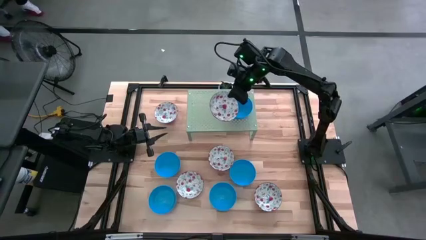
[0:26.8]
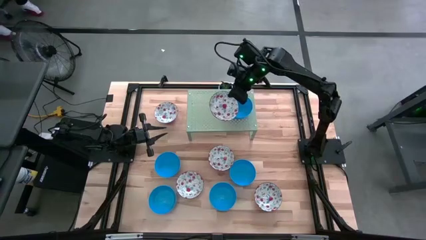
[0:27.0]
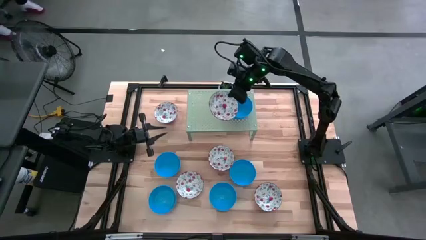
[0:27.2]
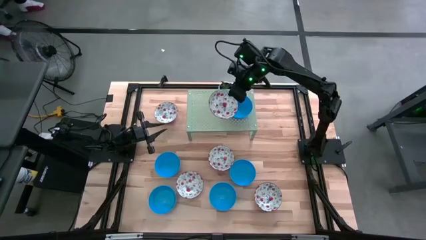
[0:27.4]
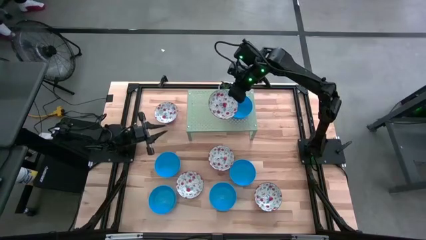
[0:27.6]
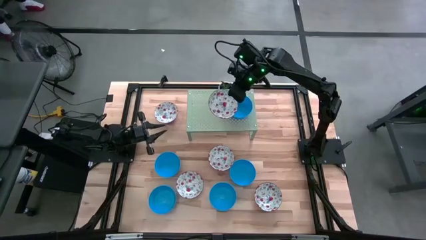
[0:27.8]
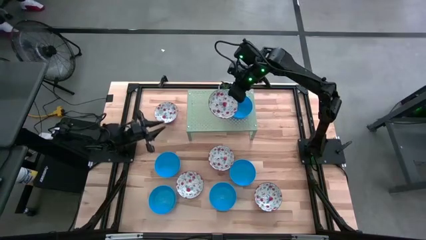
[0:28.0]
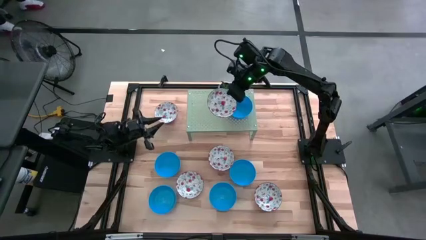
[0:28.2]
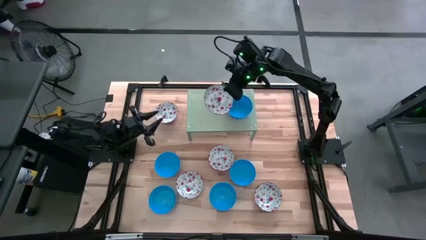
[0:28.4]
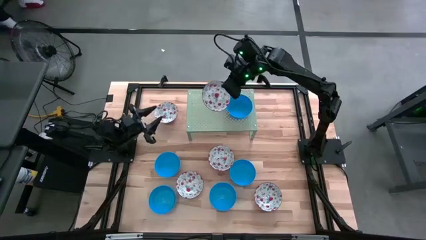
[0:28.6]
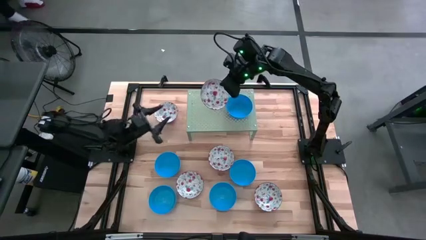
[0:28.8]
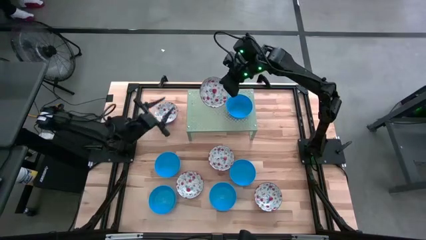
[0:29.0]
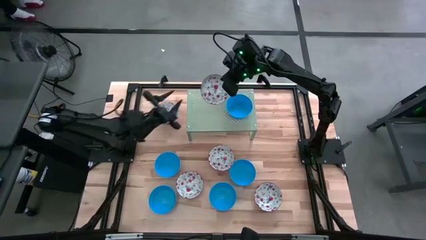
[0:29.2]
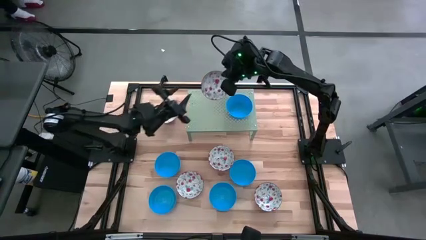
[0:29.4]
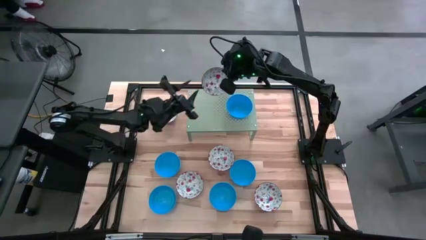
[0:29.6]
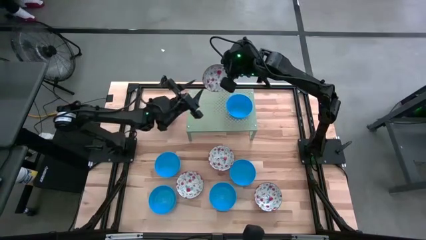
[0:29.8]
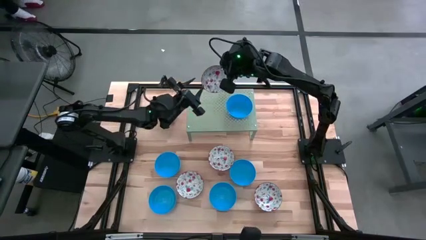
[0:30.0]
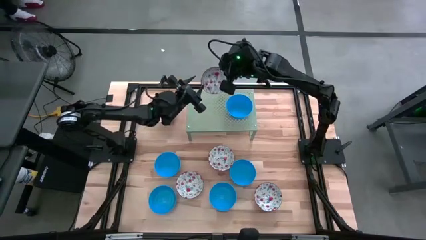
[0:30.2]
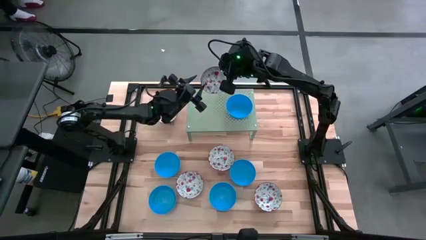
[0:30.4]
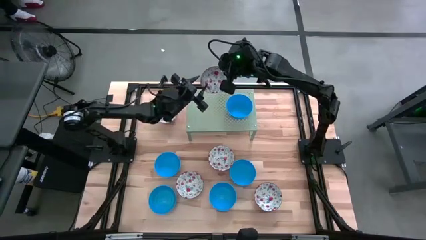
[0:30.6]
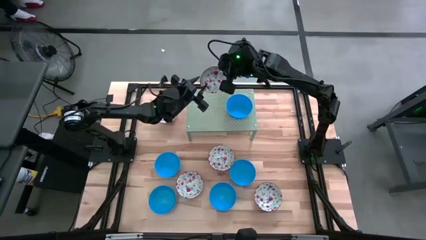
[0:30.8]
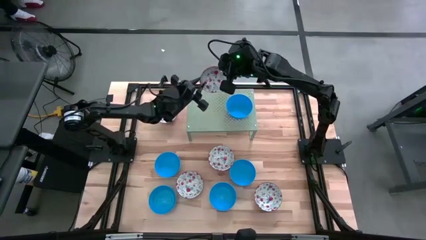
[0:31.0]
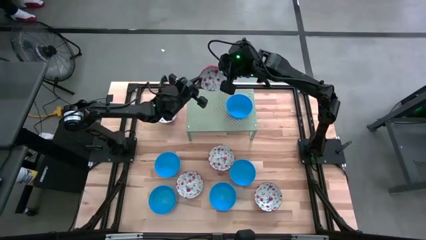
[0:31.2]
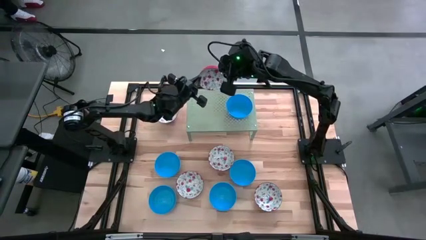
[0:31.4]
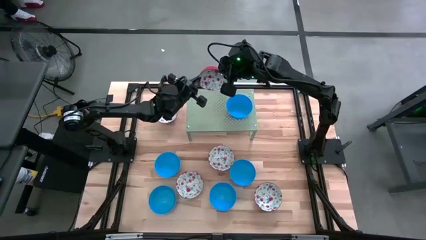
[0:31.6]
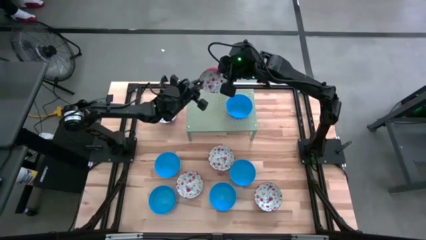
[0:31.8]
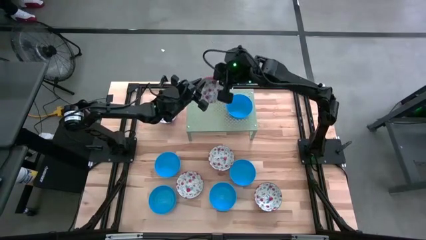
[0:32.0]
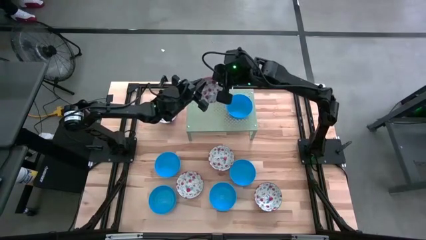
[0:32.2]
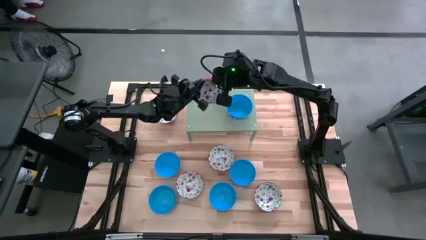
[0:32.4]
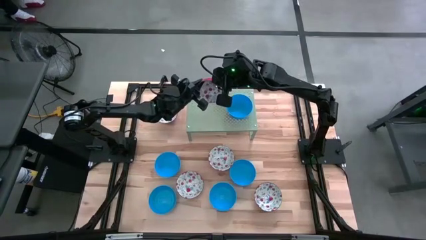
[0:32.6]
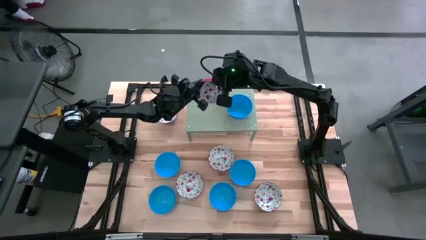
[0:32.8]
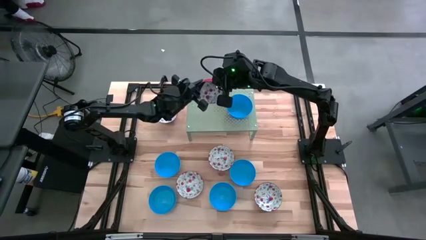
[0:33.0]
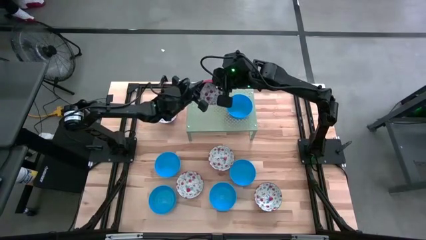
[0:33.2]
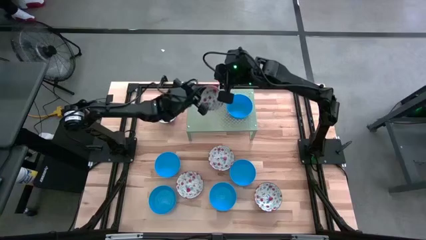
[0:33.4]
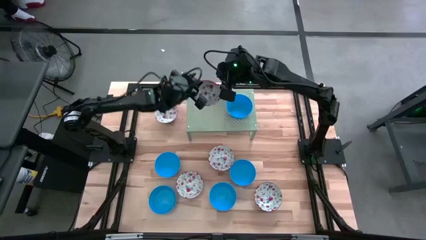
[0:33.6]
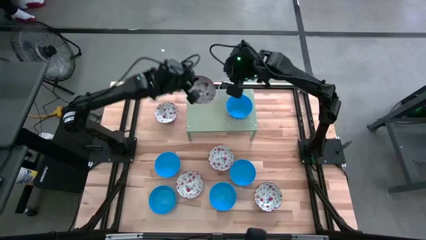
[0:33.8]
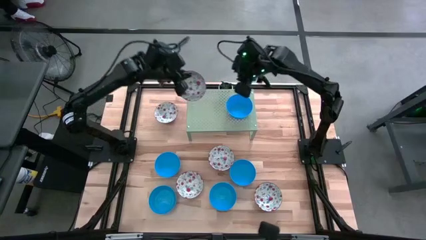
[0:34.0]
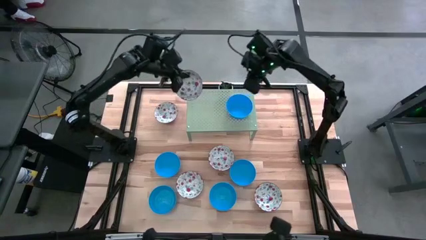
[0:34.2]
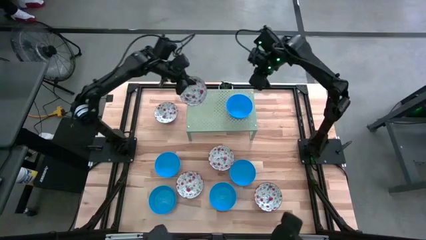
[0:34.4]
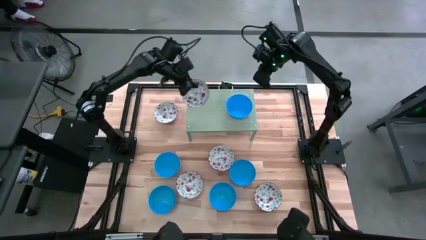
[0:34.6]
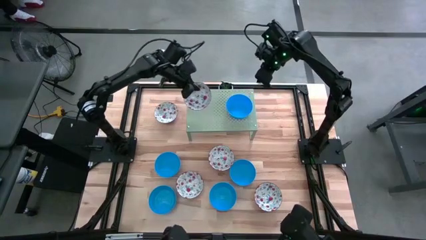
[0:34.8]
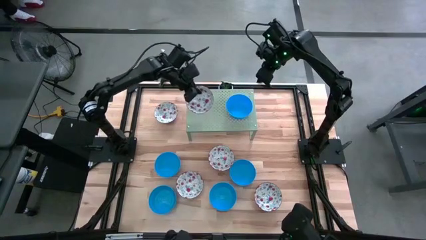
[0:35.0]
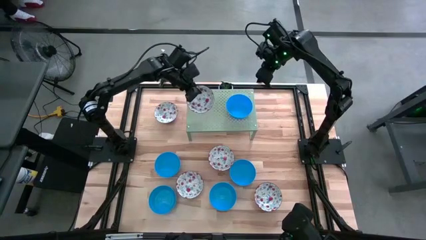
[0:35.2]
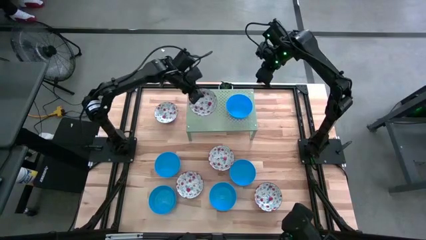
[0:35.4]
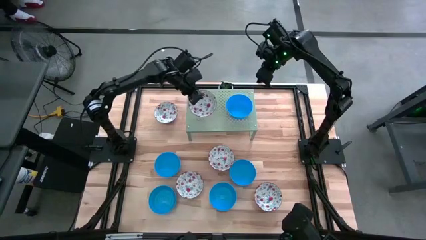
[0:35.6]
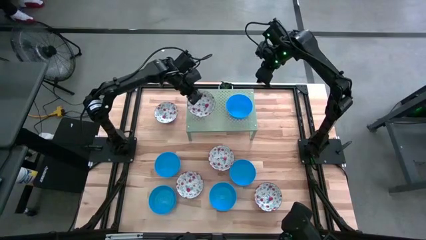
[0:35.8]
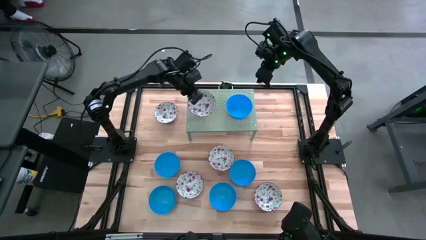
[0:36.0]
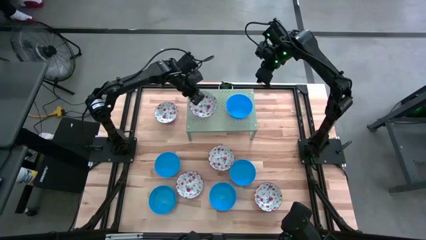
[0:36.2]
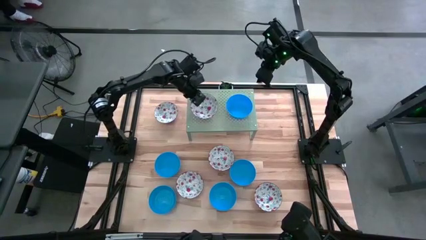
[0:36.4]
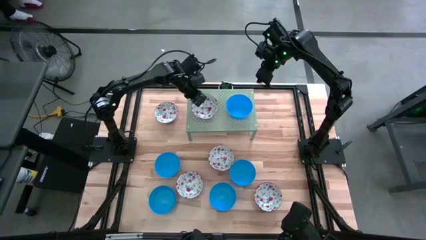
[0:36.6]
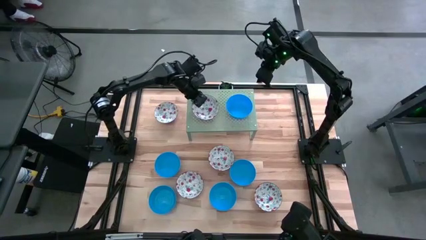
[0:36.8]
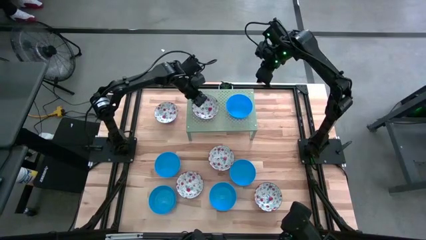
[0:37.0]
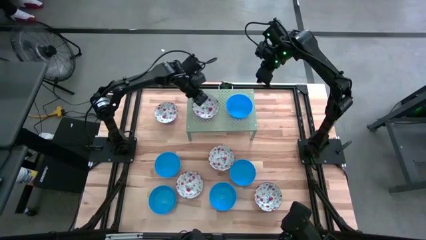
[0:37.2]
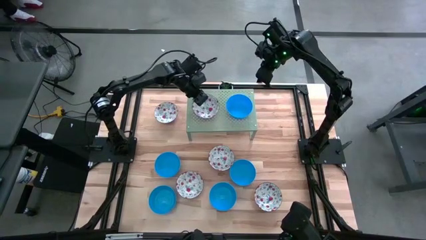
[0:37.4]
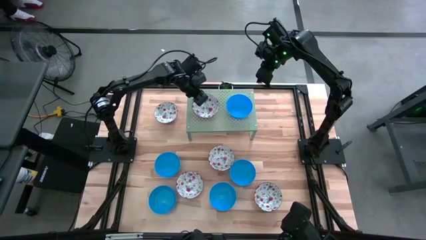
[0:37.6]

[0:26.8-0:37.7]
Task: Pick & Place Mini bowls
Put the patterned red bowl on the shelf

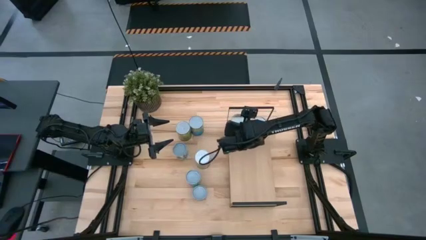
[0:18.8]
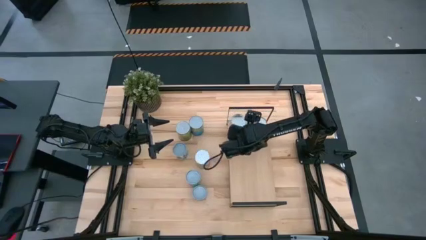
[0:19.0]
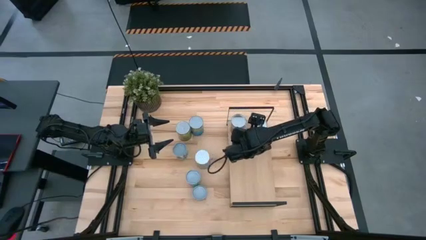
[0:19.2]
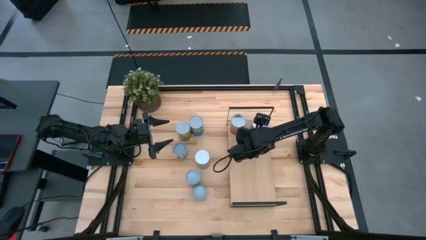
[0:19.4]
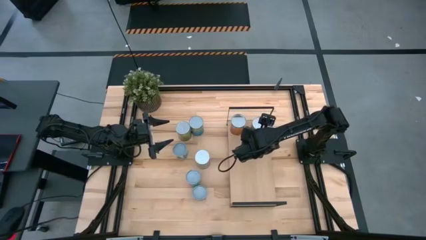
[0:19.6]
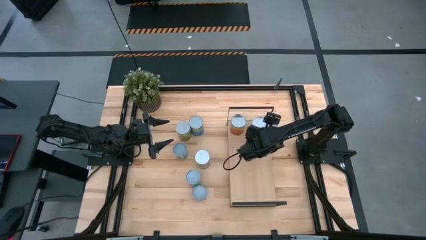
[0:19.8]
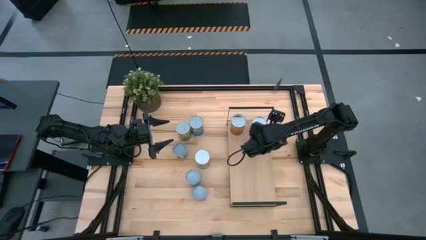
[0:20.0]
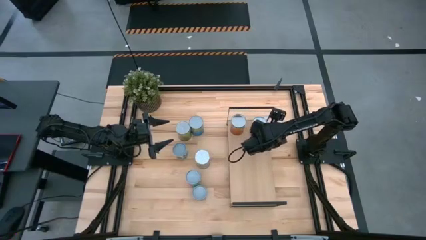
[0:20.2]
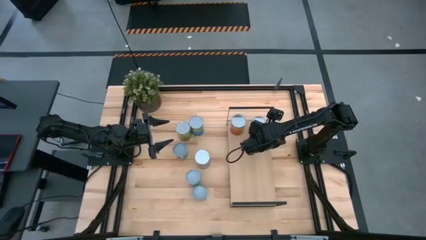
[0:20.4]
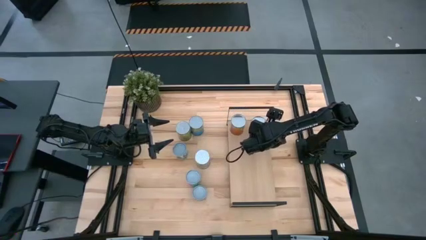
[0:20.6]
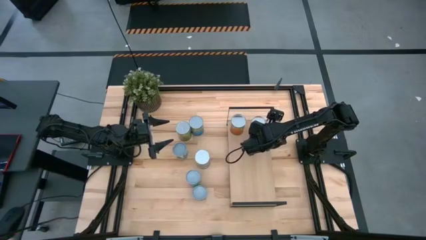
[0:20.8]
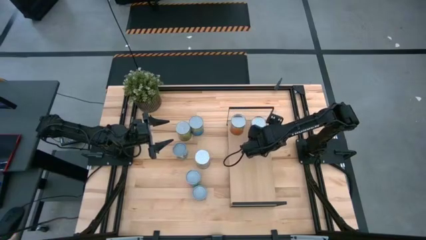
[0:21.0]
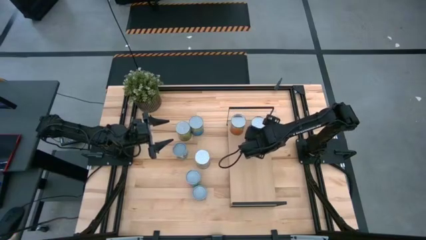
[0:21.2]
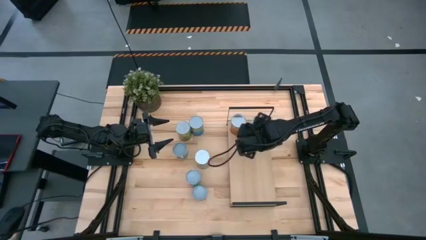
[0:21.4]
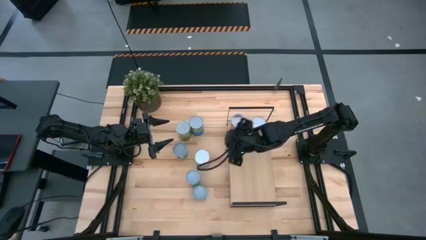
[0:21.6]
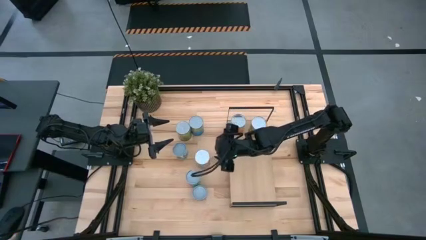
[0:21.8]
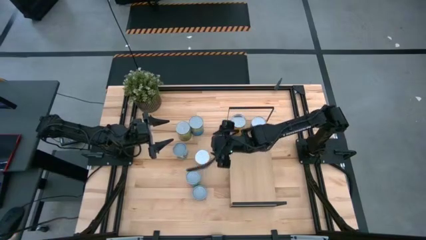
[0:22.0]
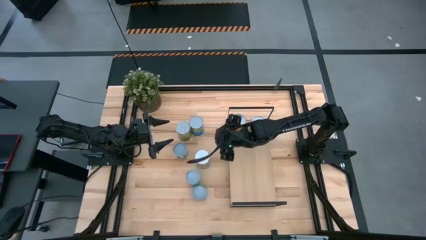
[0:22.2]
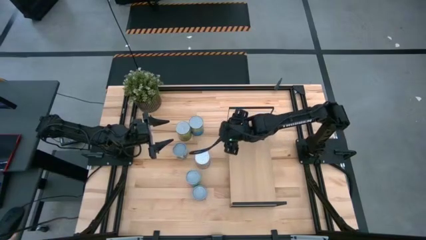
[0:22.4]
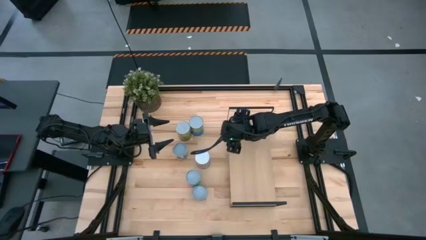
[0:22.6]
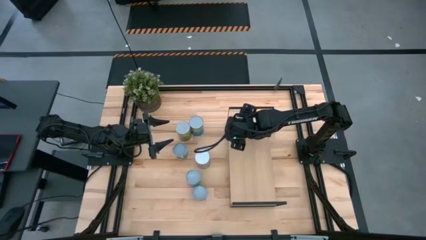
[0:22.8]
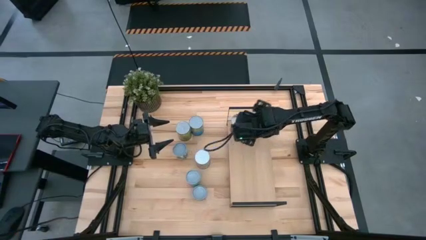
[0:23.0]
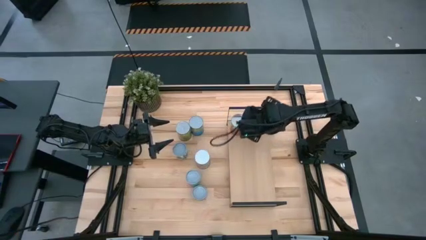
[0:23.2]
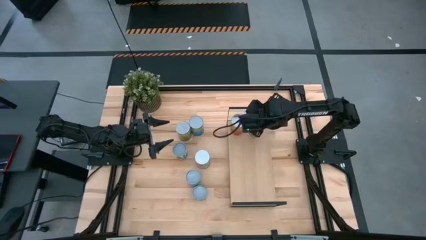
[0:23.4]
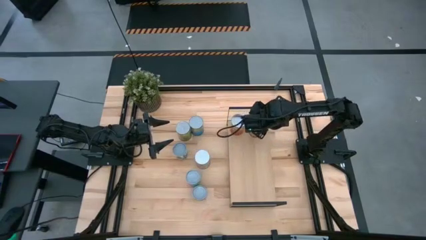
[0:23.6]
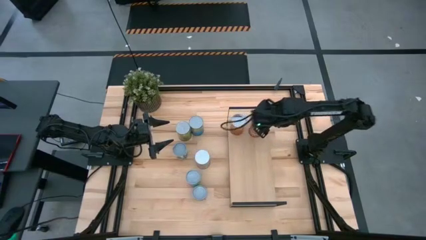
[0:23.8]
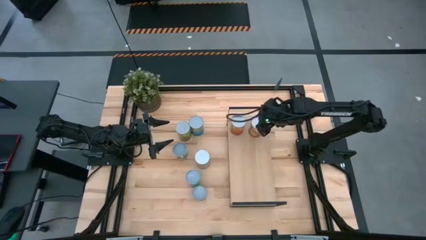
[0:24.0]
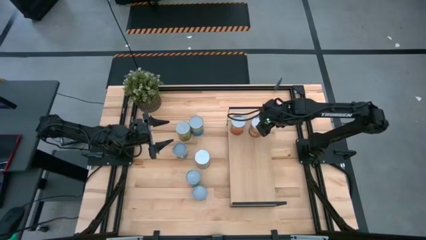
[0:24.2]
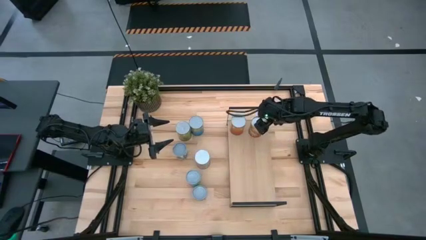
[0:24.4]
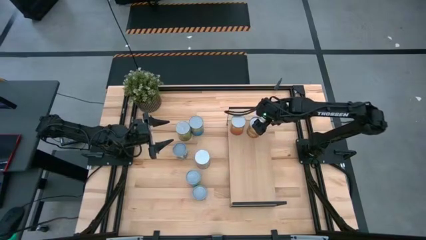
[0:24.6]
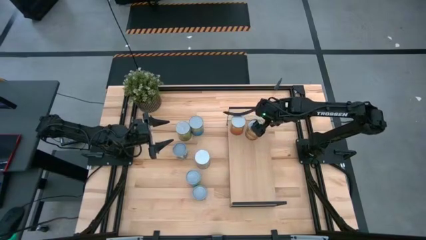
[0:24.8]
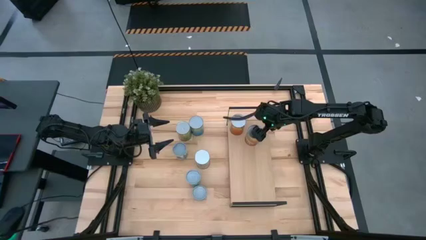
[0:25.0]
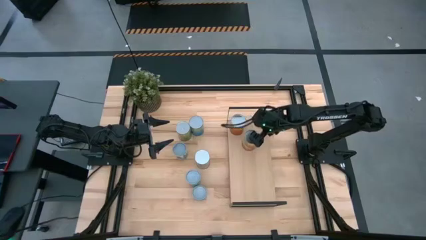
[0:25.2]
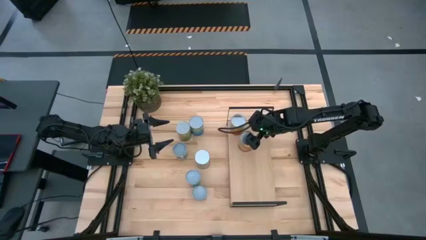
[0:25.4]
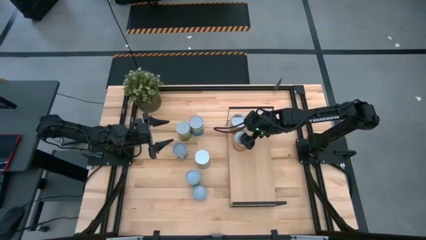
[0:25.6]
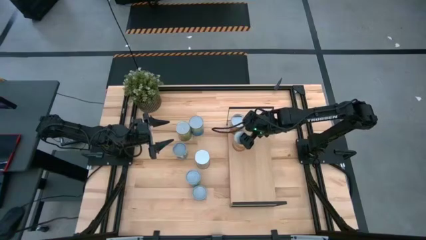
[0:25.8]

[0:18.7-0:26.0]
Task: Pick and place cans onto a shelf
Adjust the canned corn on the shelf
